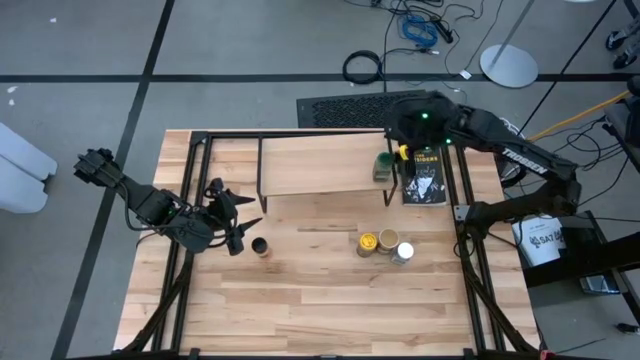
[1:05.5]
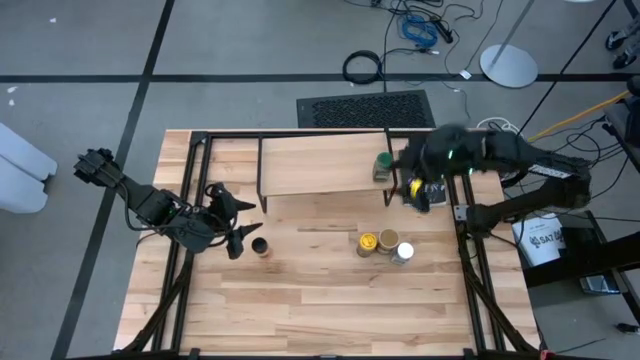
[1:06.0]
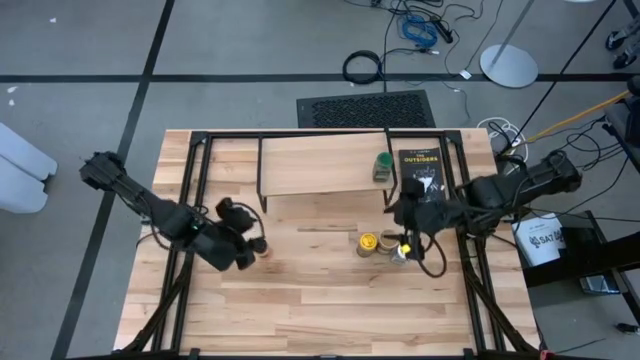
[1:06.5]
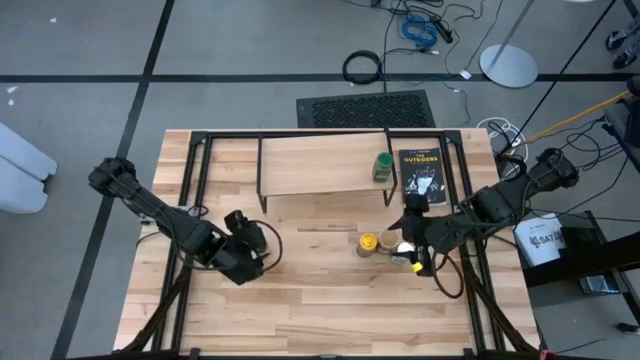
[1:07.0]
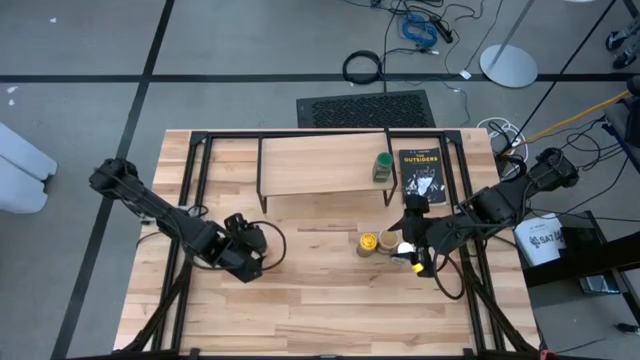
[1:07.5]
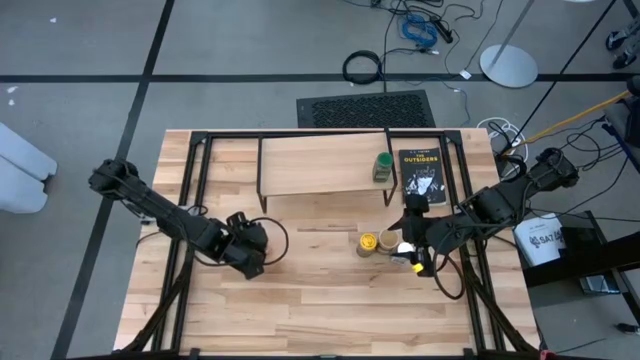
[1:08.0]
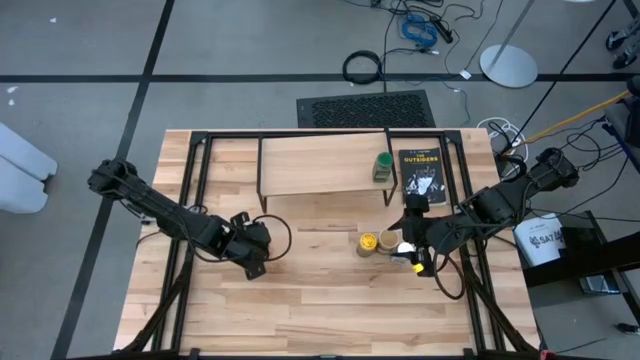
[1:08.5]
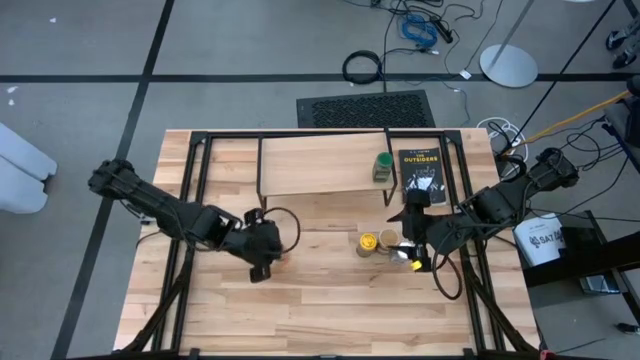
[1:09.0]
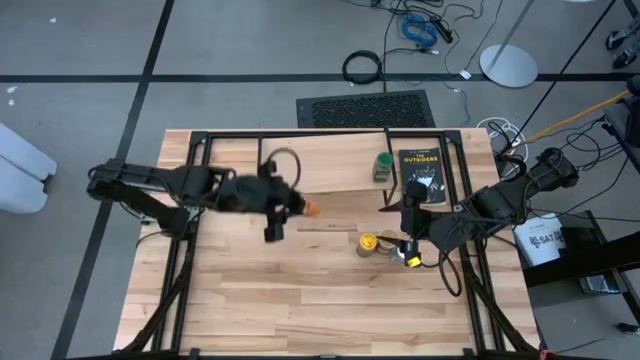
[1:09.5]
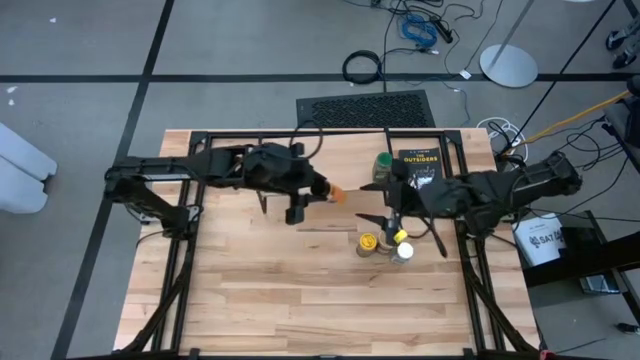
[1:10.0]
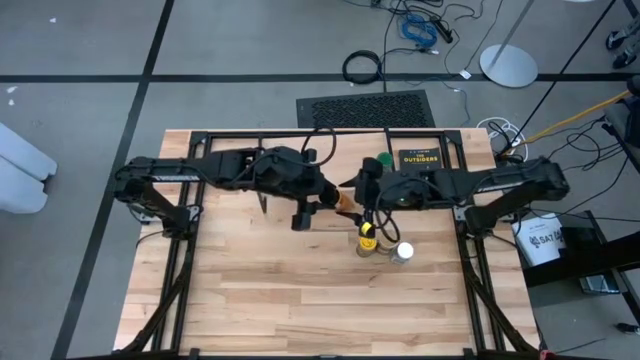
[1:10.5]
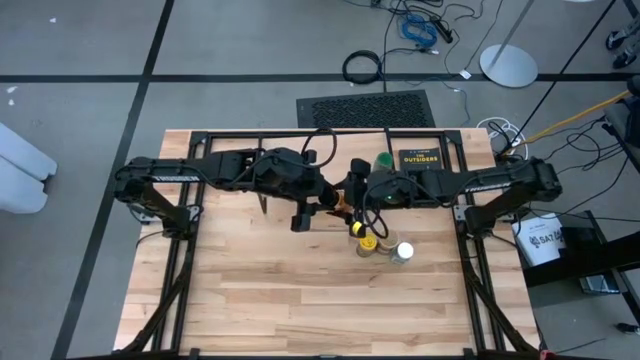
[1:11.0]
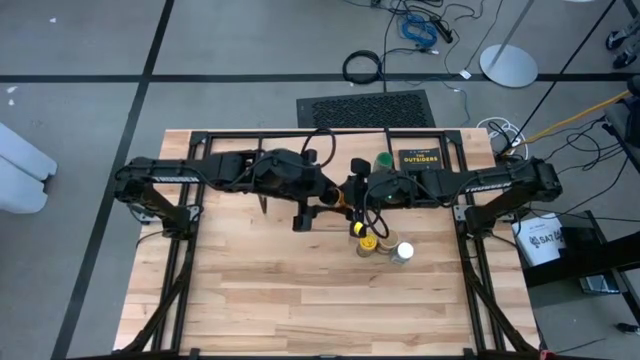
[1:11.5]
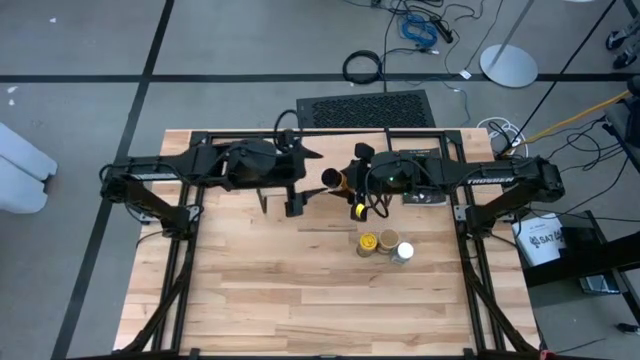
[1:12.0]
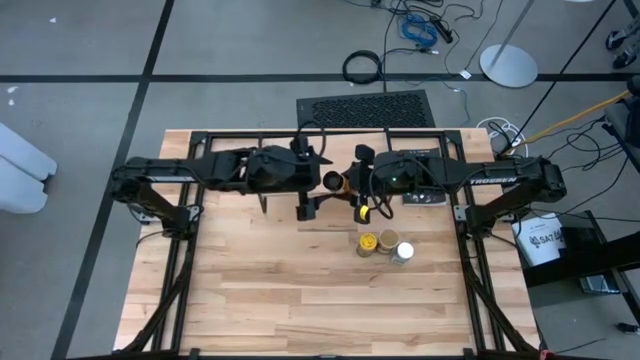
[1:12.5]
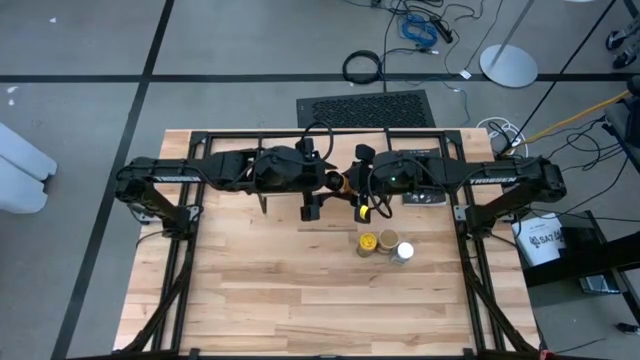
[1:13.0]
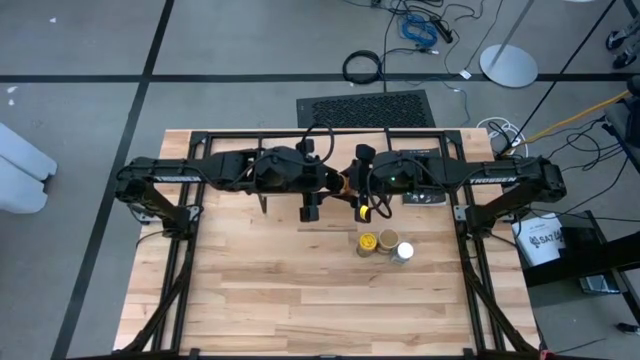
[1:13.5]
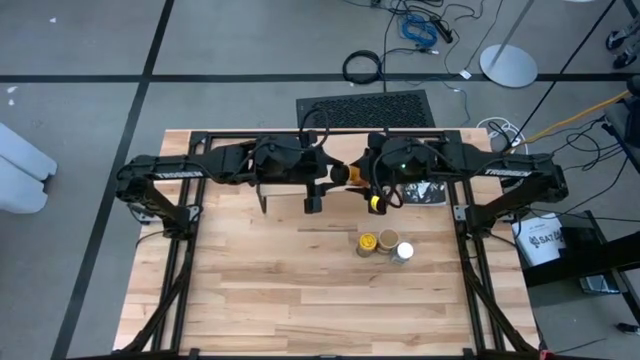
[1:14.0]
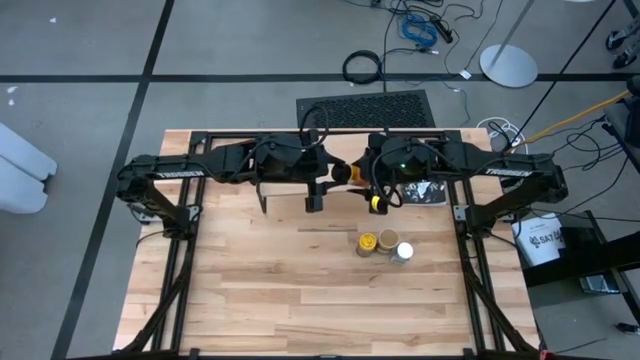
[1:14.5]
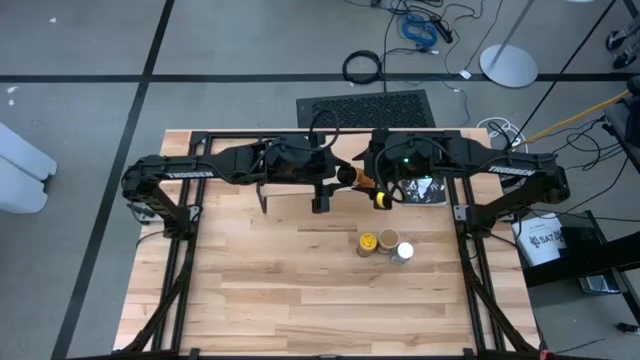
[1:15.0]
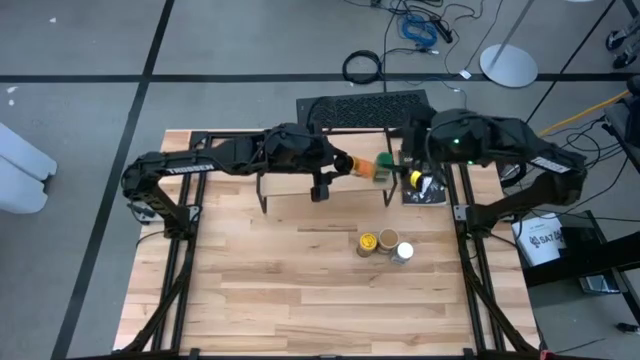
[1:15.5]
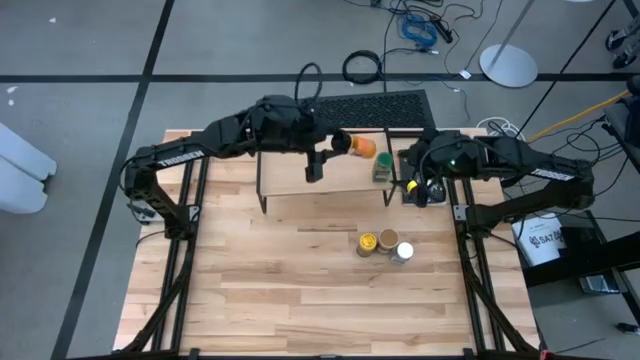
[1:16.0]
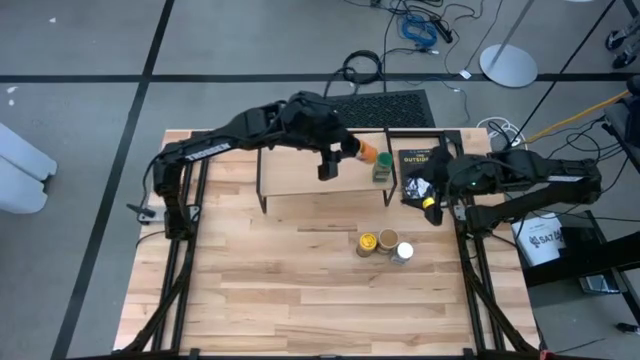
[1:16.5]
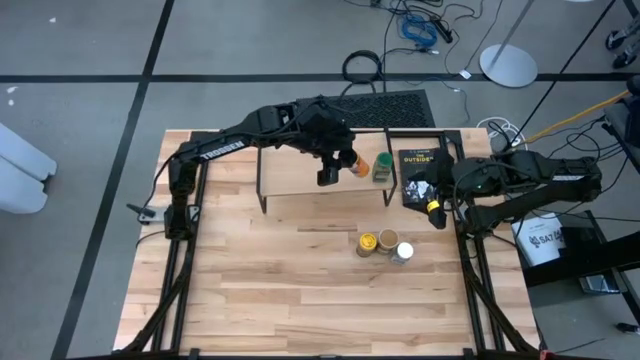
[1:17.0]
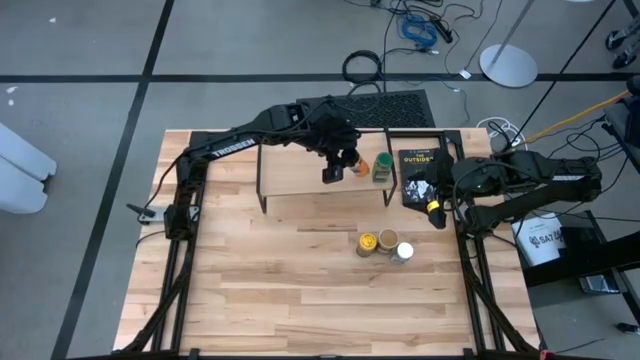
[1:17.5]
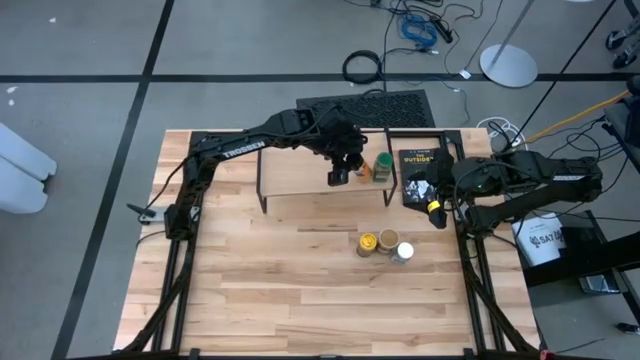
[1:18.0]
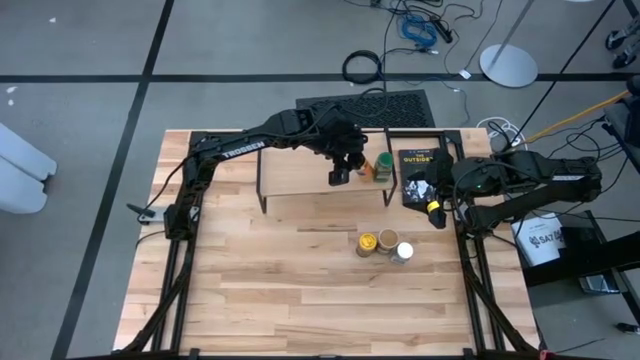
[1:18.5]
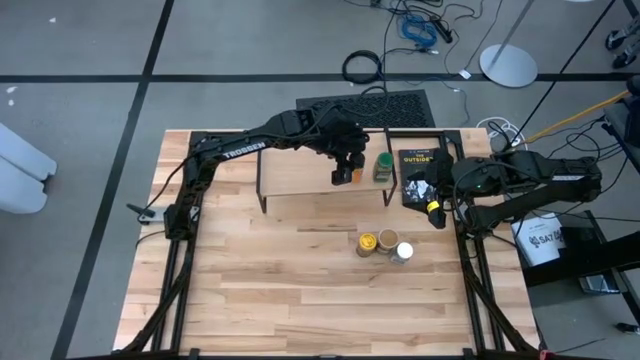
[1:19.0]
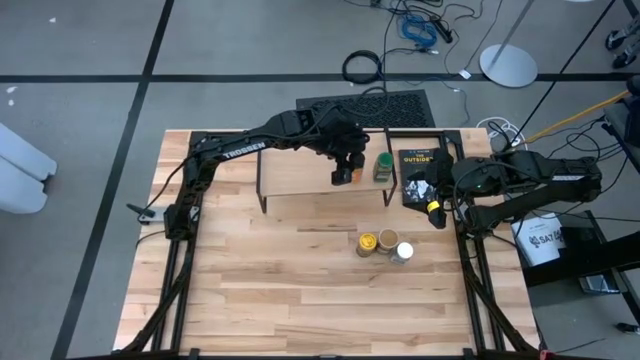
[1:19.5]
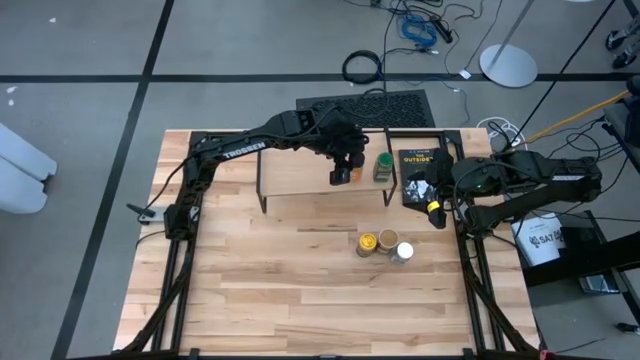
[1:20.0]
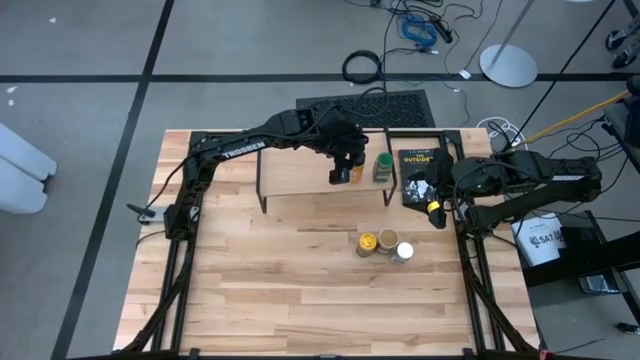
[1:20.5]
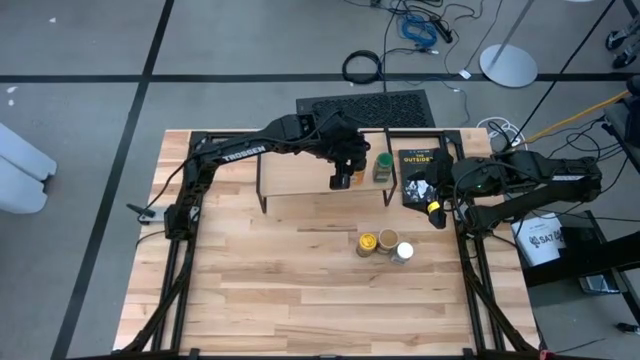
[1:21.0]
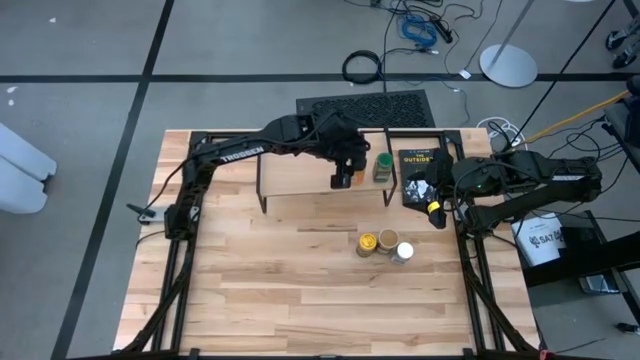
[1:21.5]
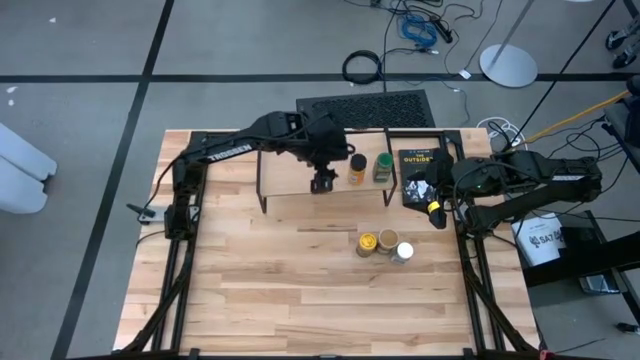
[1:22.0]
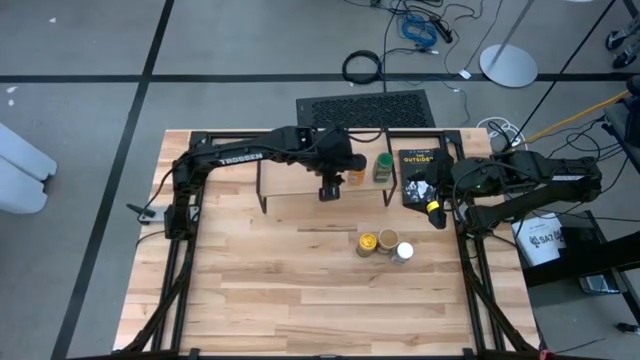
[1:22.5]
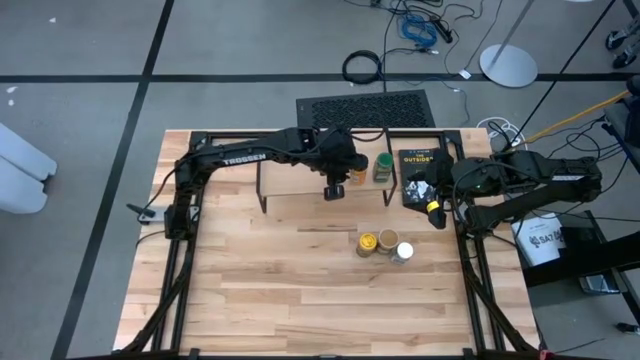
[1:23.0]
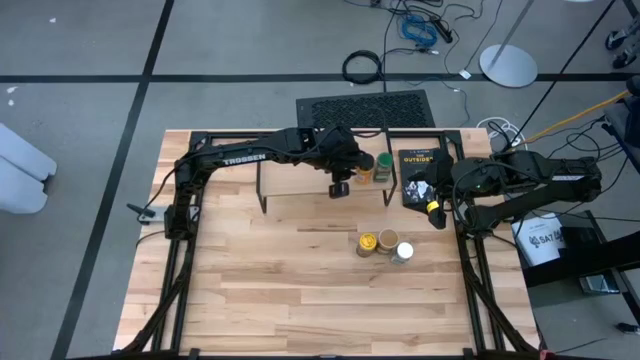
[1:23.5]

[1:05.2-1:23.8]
Task: Shelf spices
Put the orange seasoning bottle on the shelf

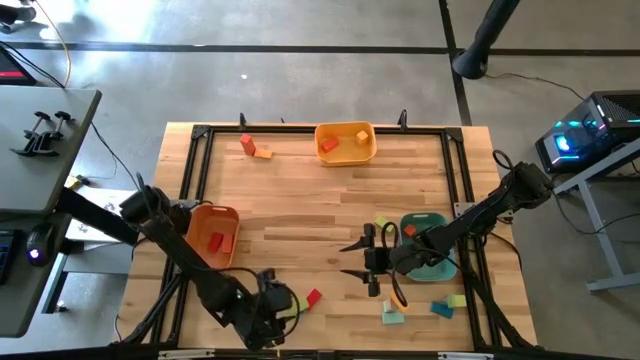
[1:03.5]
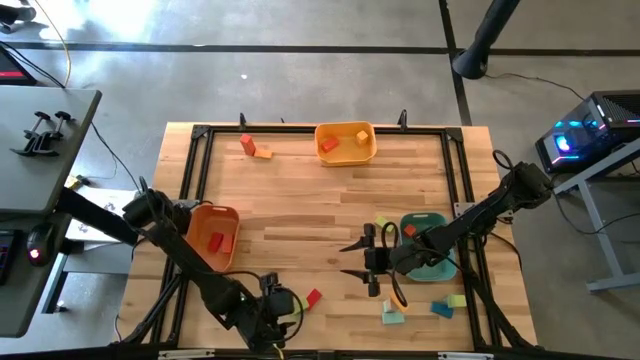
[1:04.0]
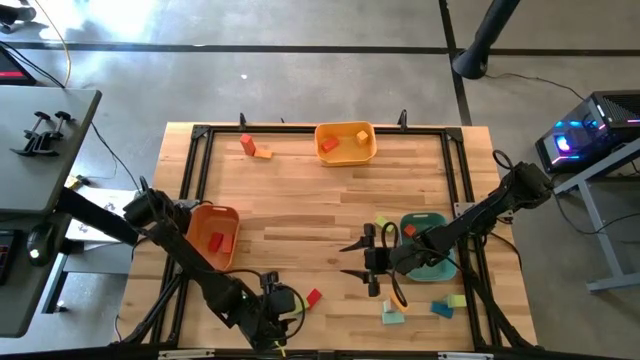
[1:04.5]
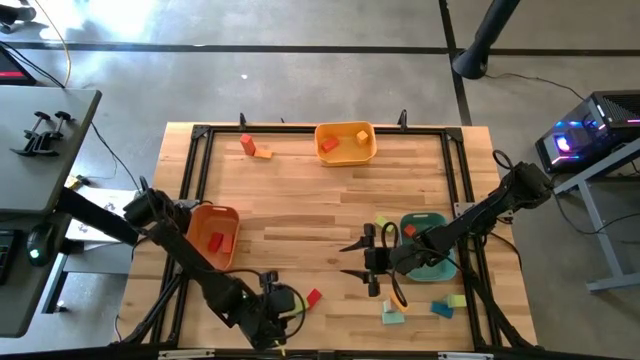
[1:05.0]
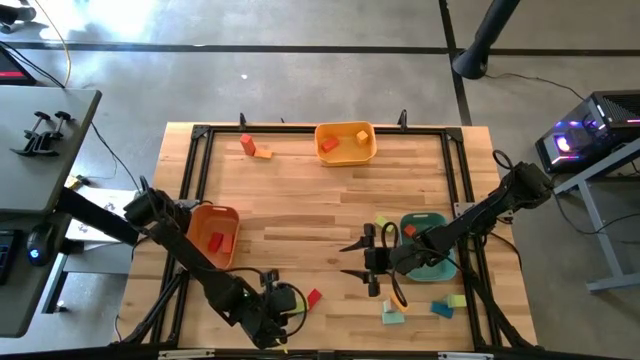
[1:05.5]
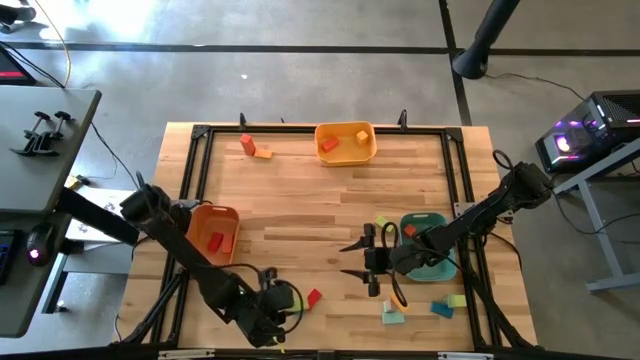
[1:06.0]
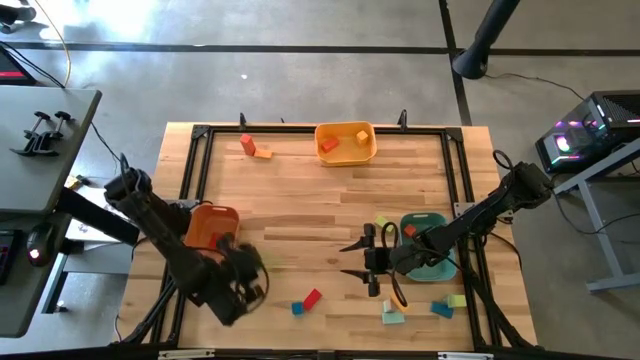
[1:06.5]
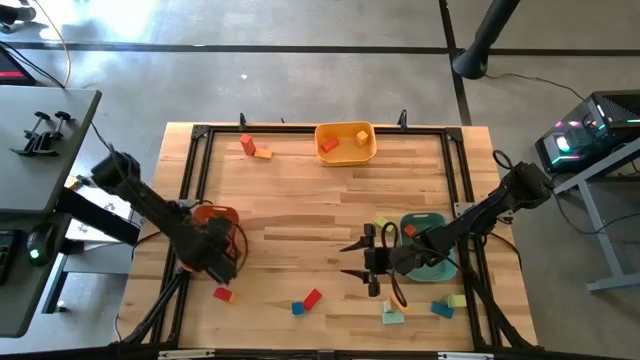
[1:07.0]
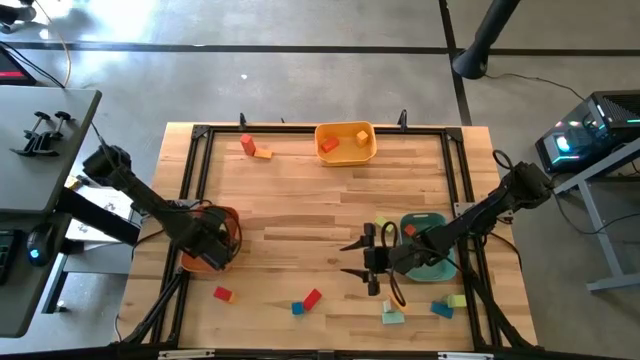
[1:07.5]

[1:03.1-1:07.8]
Task: Sort blocks by size
Put the green medium block into the orange bin
